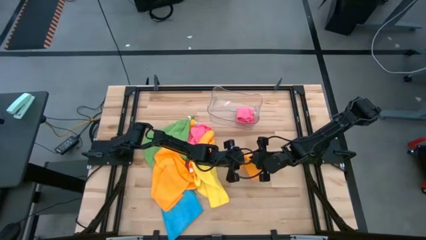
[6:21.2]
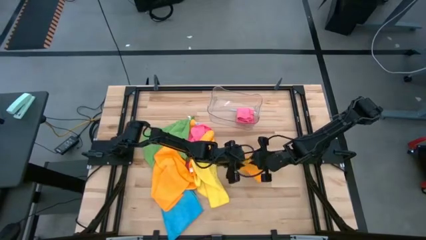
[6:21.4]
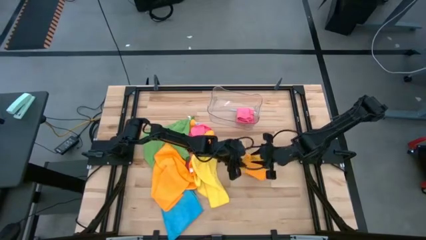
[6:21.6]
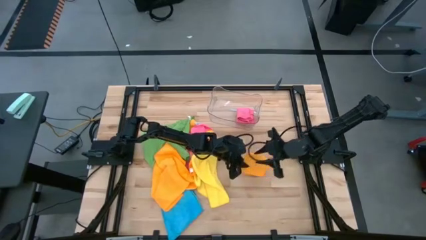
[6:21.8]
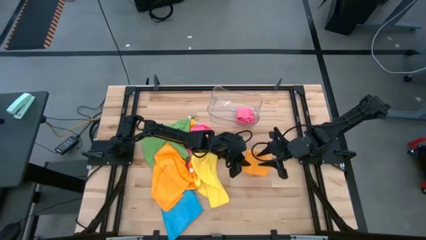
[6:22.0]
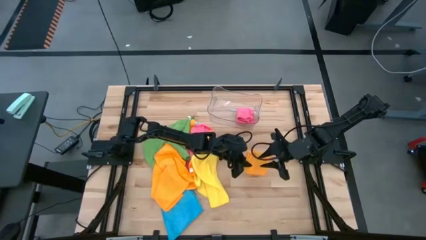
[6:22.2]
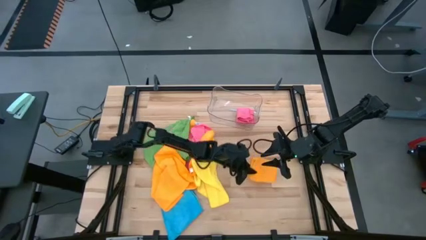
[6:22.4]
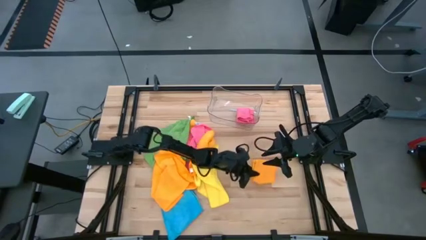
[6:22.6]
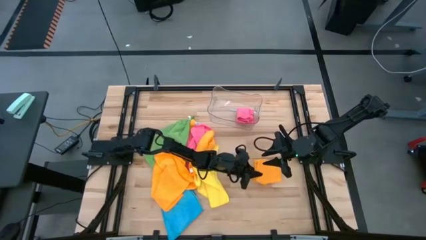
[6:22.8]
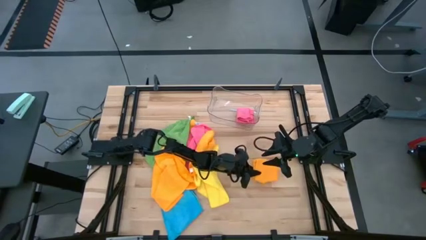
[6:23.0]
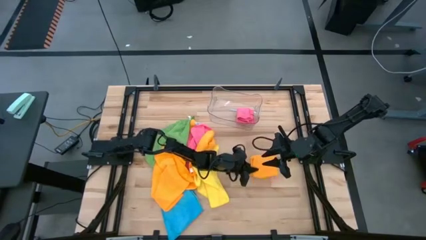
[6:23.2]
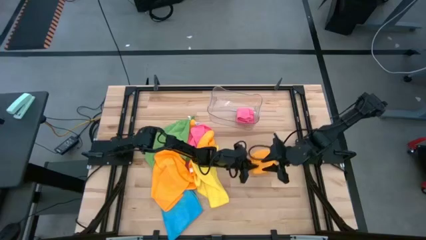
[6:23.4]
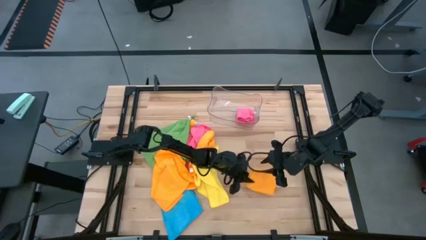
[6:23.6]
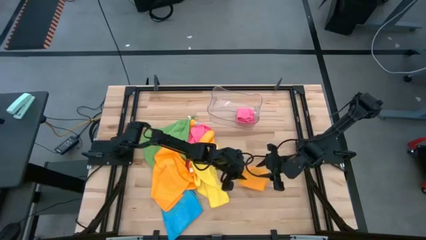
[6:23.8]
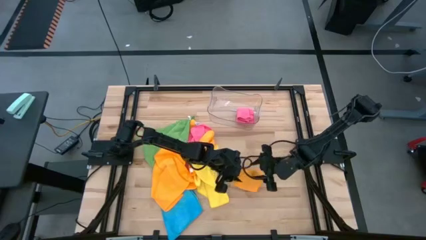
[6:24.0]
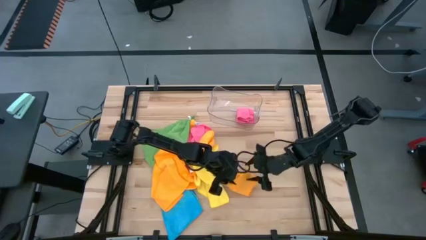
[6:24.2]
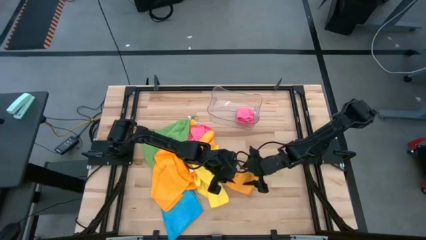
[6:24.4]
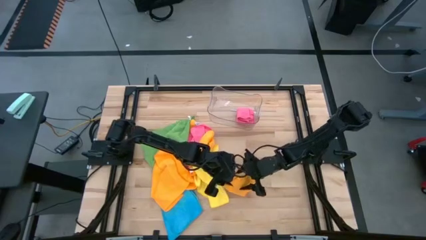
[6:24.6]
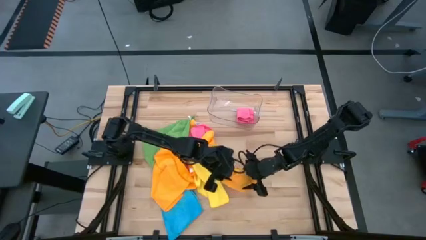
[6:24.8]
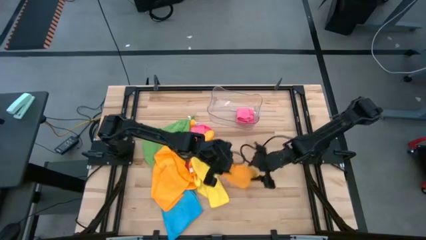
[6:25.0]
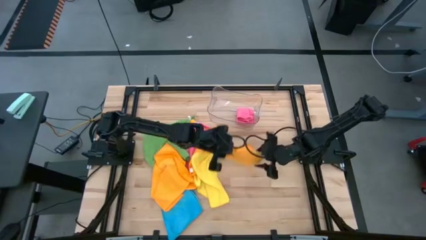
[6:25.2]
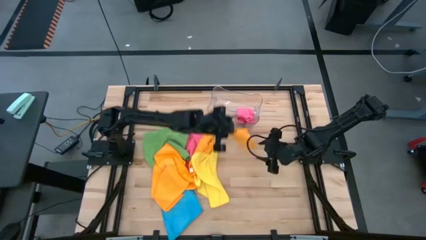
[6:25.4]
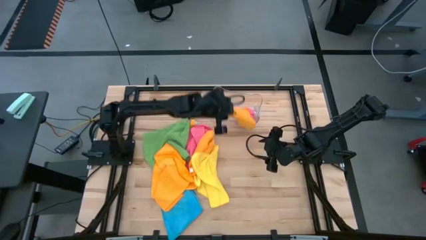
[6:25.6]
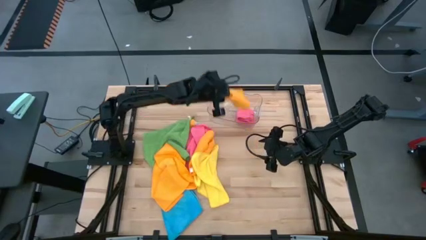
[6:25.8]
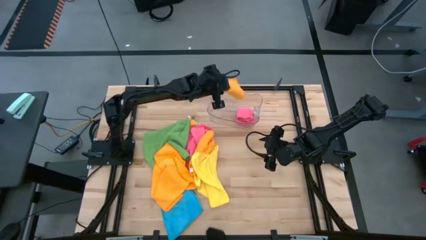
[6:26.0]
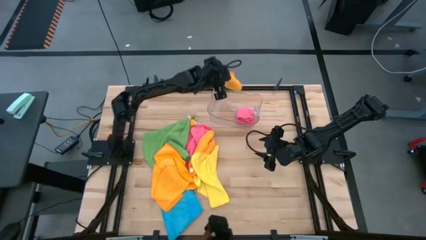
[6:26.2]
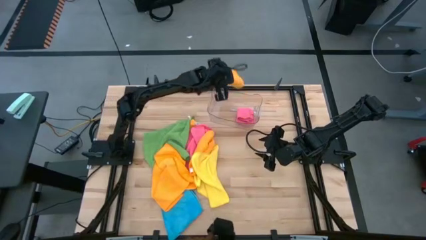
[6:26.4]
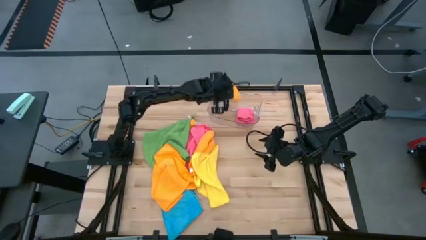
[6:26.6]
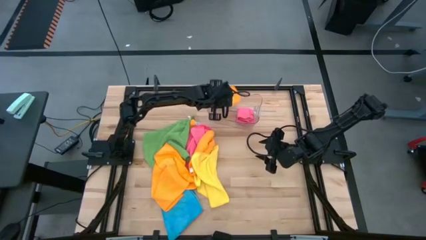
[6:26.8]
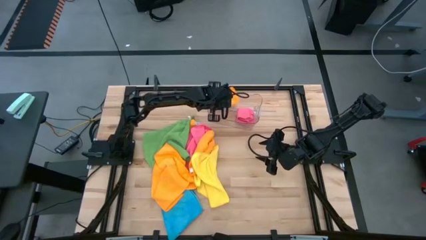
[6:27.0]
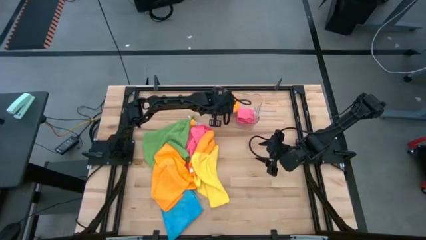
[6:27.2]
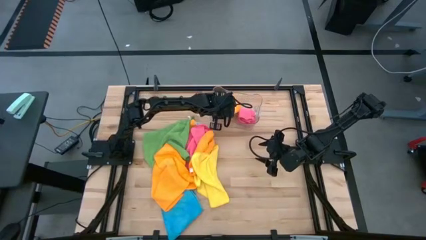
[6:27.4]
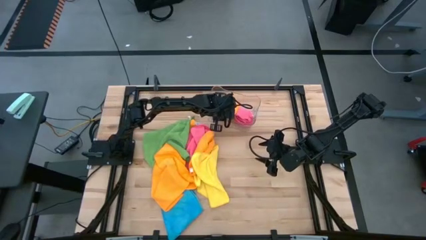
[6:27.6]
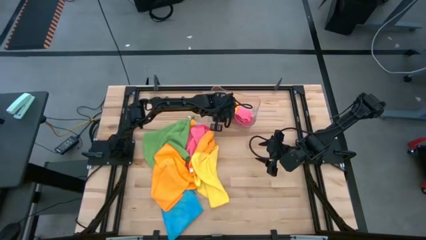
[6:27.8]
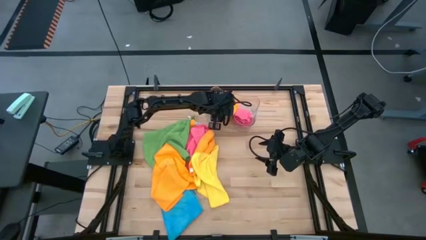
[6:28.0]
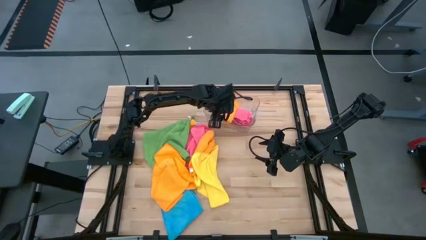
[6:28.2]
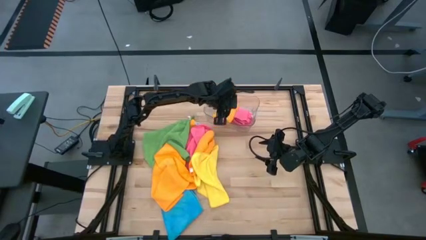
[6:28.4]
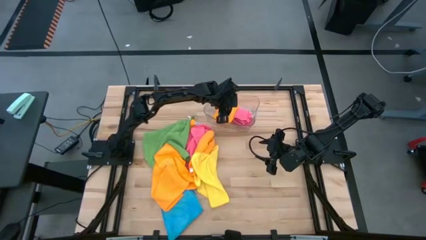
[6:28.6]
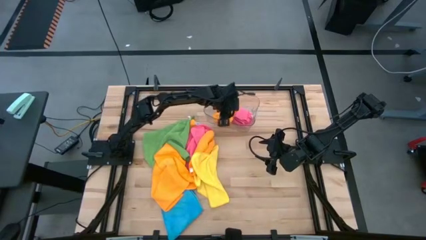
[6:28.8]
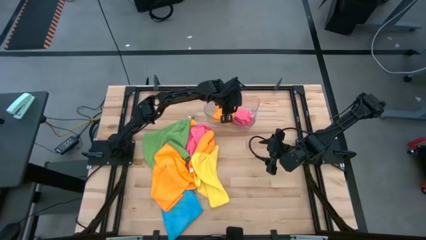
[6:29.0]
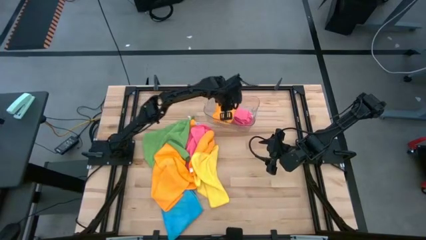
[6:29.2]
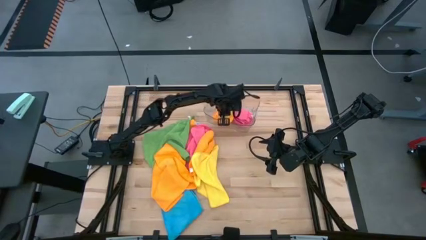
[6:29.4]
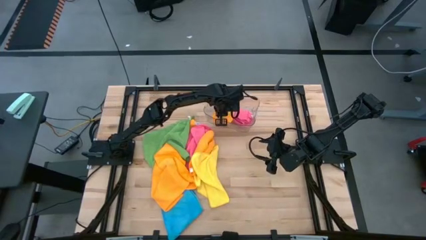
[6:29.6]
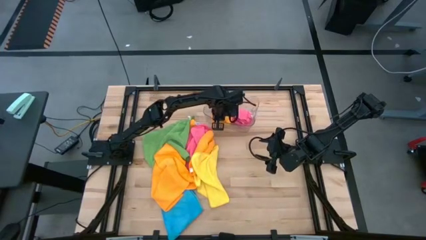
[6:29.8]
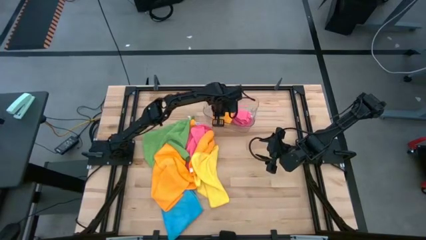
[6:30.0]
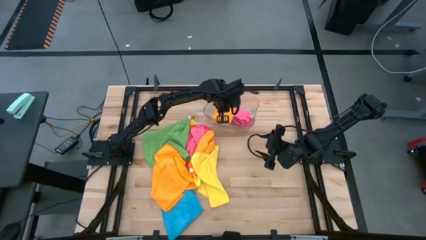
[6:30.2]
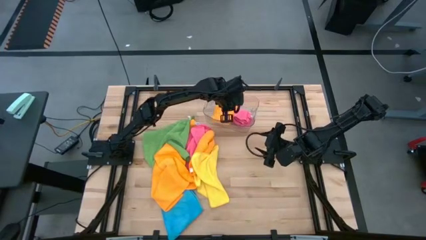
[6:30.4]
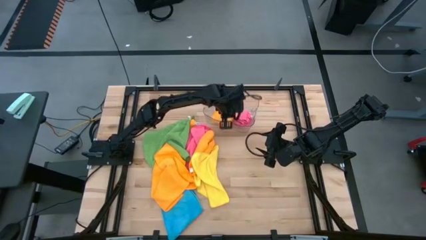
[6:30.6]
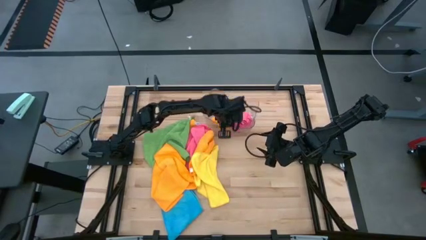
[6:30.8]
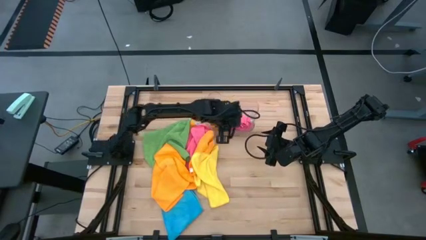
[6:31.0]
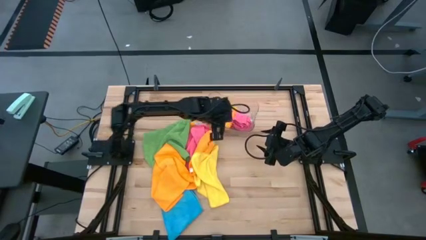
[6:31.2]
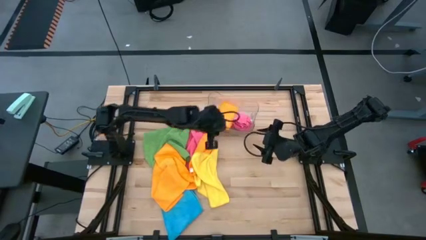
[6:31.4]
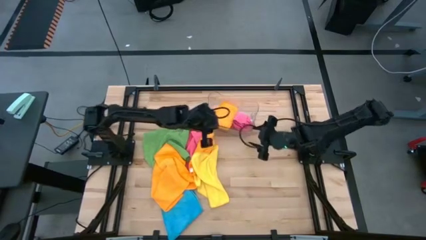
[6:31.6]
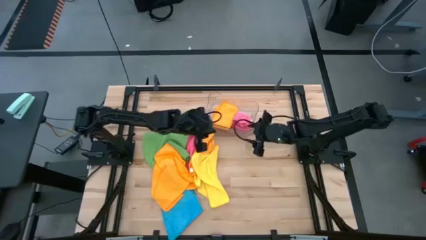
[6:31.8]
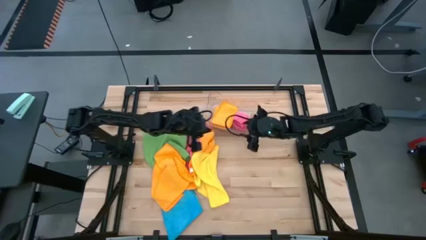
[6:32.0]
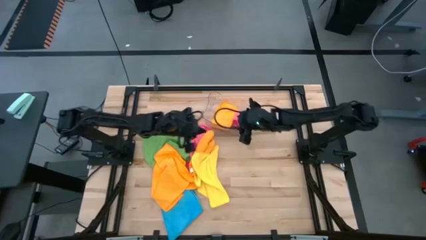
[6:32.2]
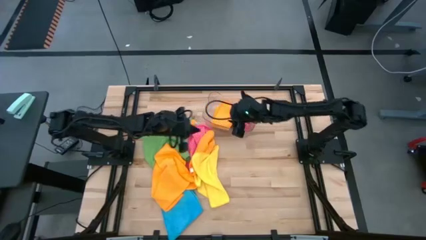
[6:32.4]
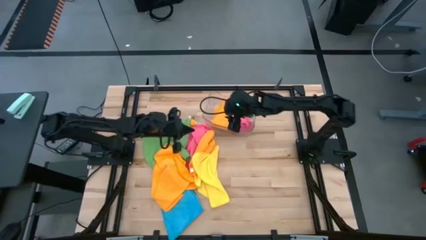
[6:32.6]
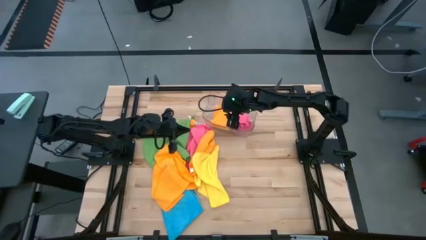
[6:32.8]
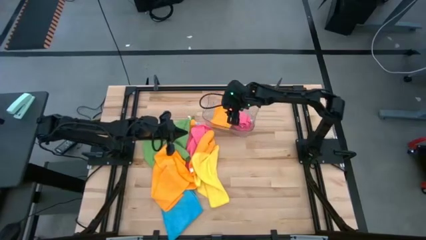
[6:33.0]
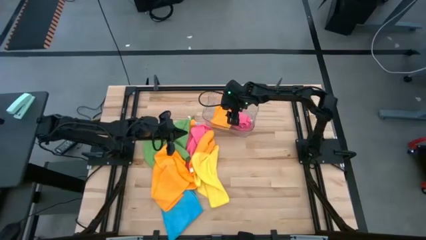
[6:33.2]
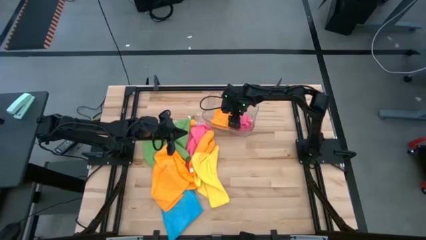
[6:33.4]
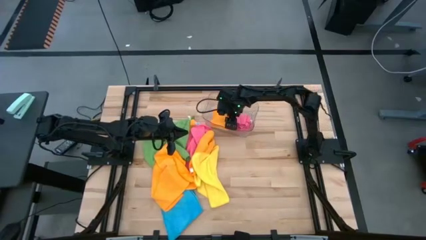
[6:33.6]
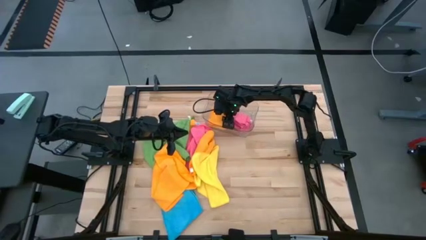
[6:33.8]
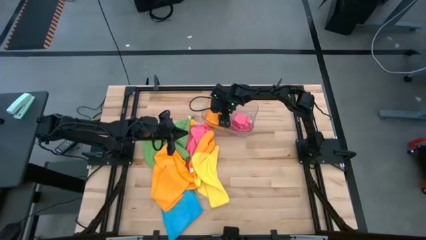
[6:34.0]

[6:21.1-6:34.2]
Task: Fold microfiber towels
Put the right orange microfiber cloth into the transparent bin

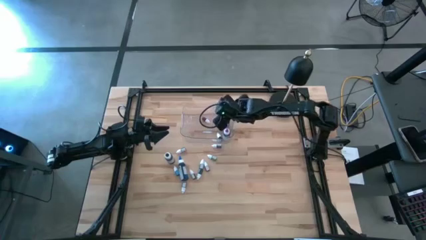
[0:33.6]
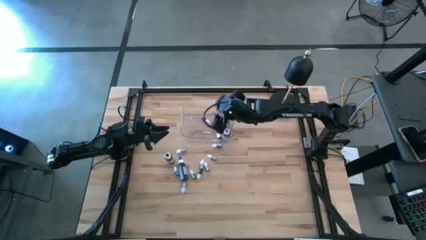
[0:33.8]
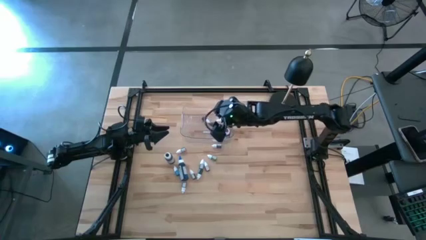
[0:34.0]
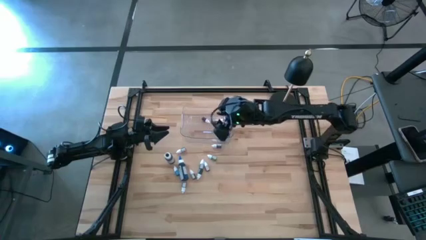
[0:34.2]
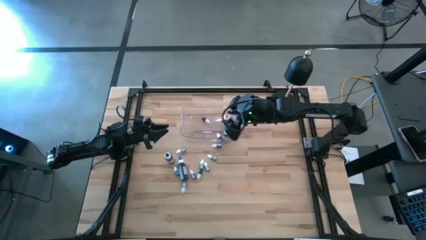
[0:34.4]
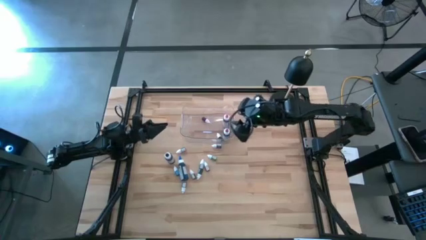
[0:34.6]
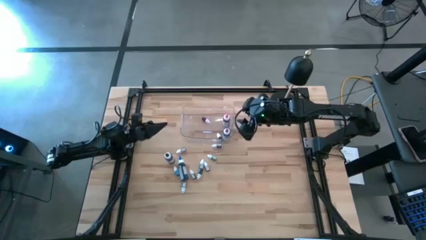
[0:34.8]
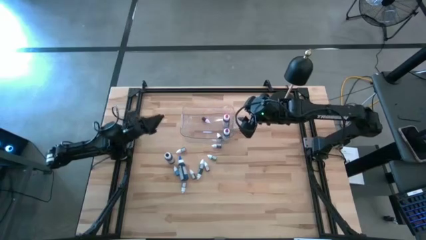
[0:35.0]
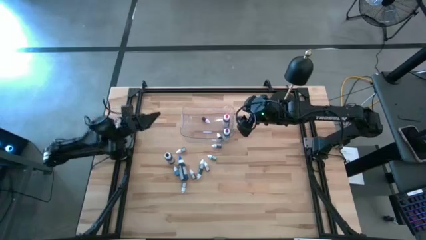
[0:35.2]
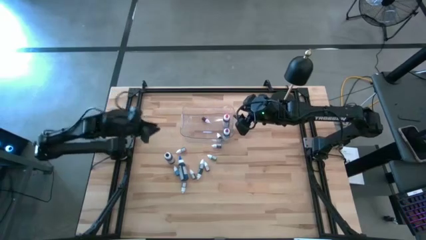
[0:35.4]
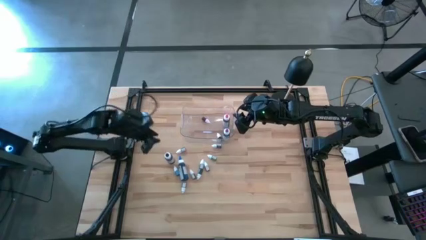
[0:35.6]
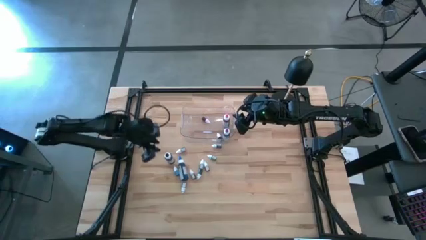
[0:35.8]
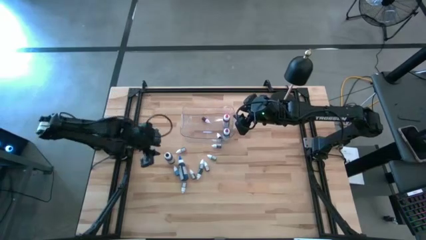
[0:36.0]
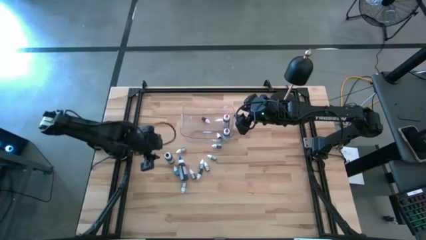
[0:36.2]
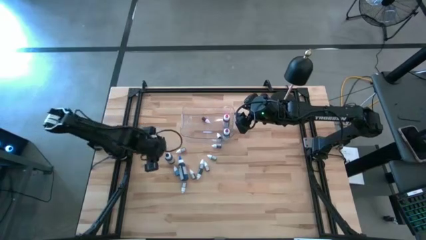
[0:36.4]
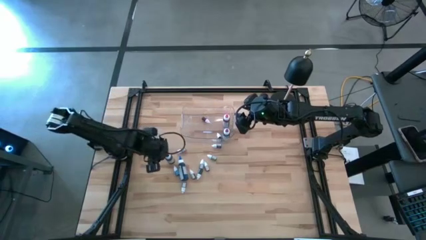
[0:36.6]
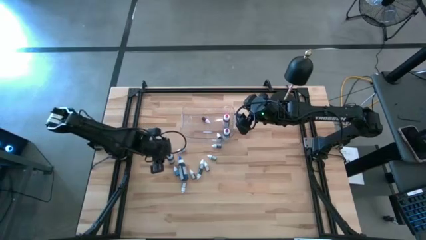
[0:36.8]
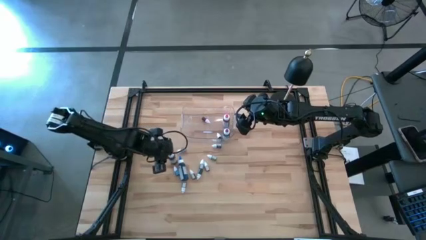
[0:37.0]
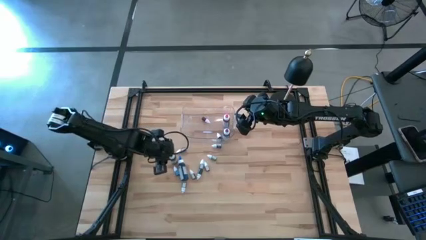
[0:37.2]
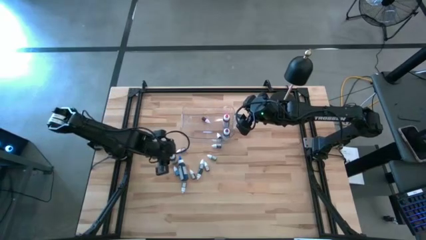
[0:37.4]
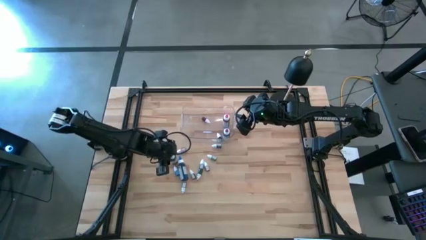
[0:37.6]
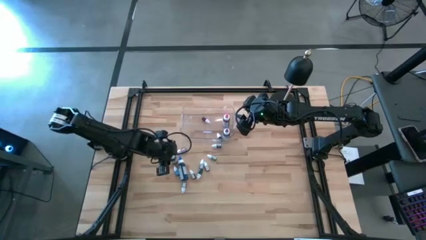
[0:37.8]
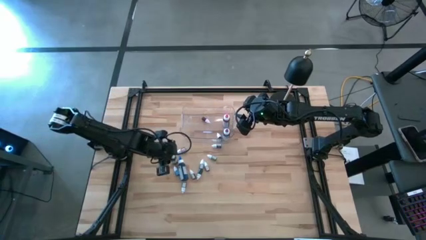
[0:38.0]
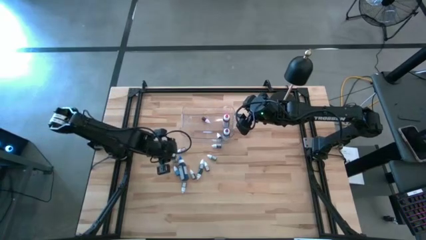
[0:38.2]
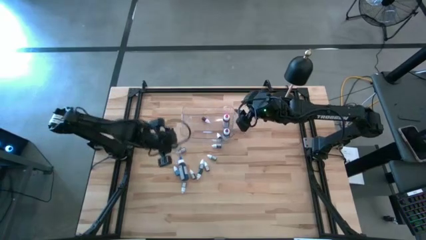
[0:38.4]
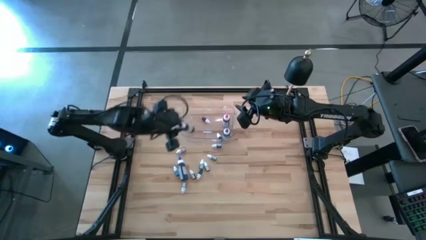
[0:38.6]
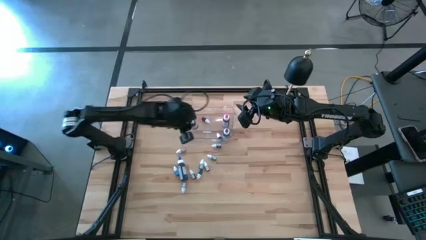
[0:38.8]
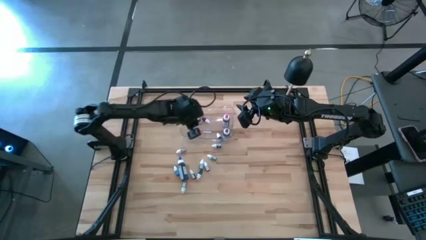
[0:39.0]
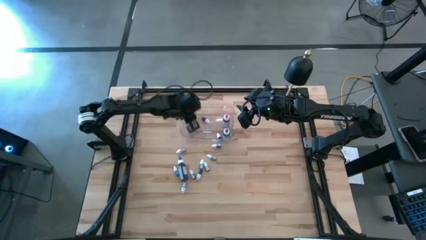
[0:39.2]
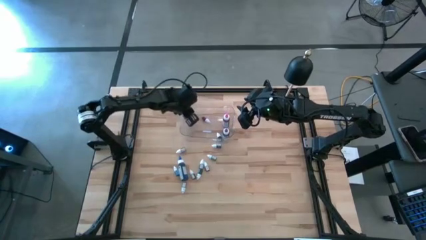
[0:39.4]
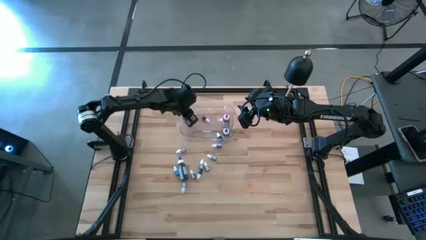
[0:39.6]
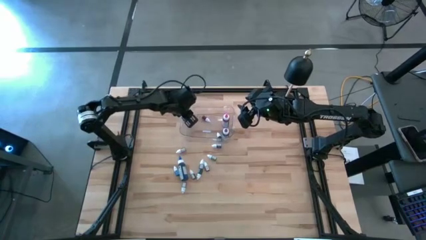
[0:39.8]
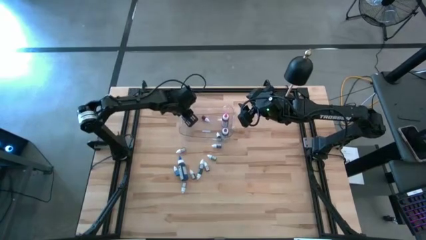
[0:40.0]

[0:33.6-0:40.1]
Task: Pick & Place food coloring
Put the large black food coloring bottle into the transparent bin
